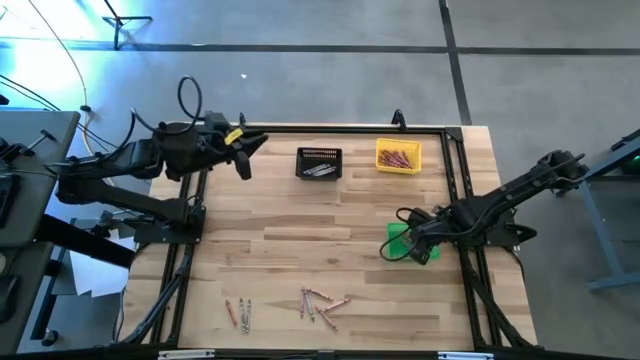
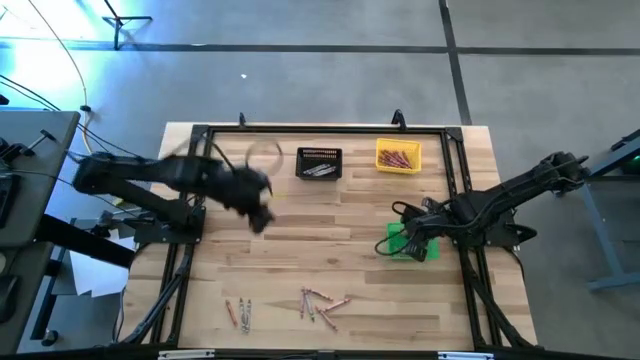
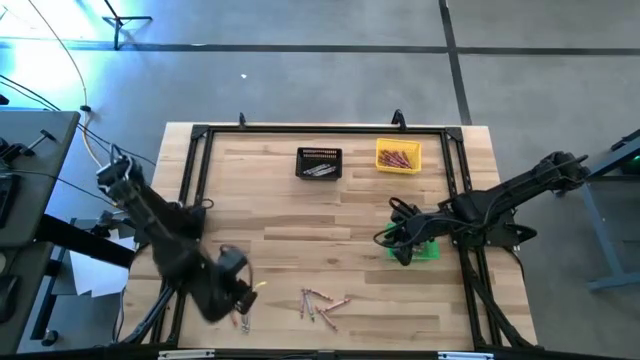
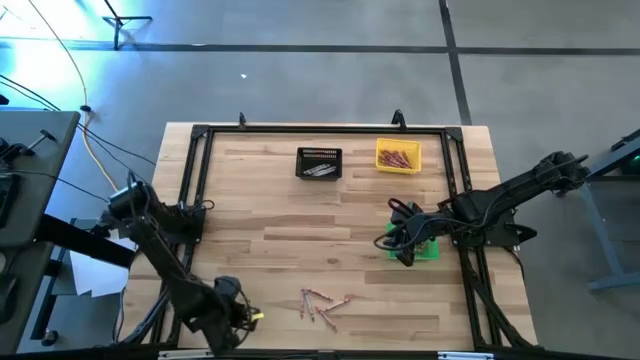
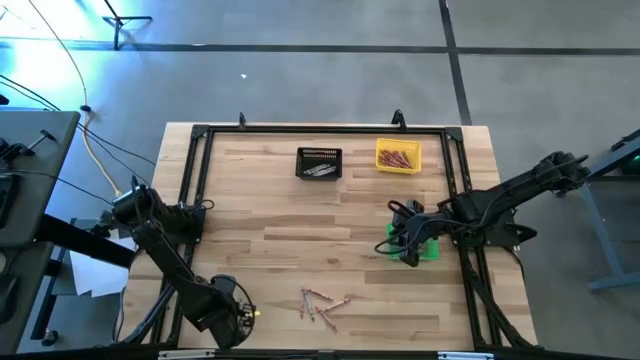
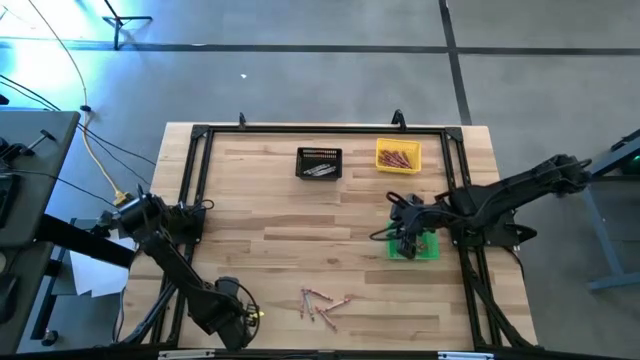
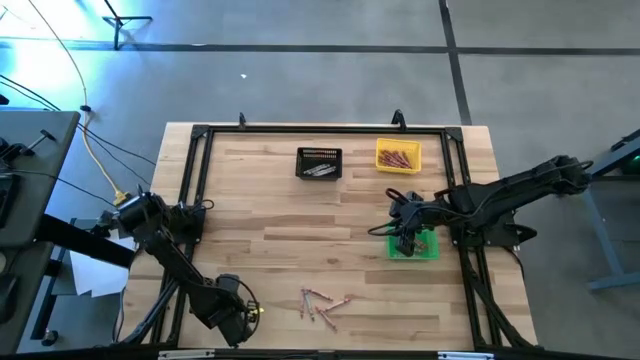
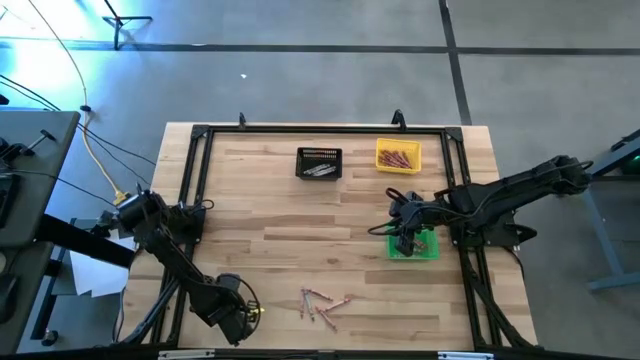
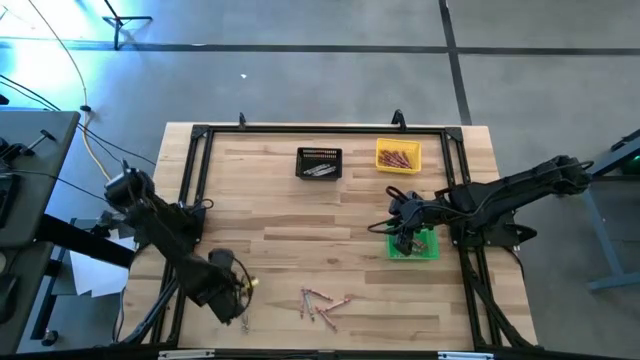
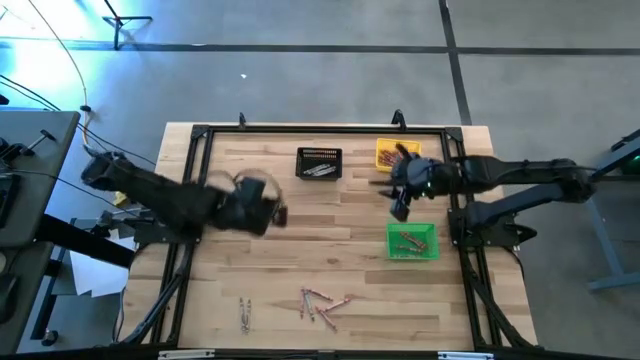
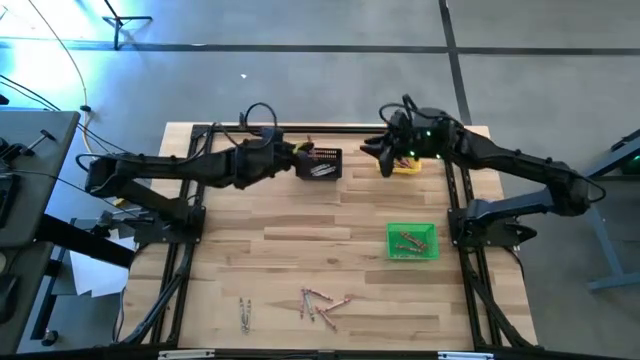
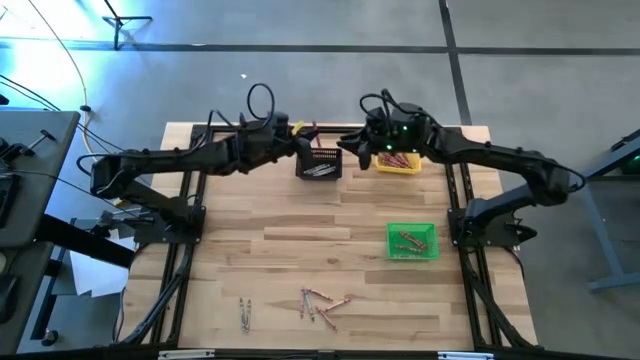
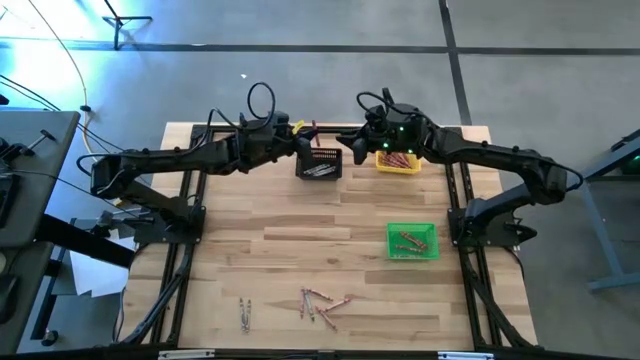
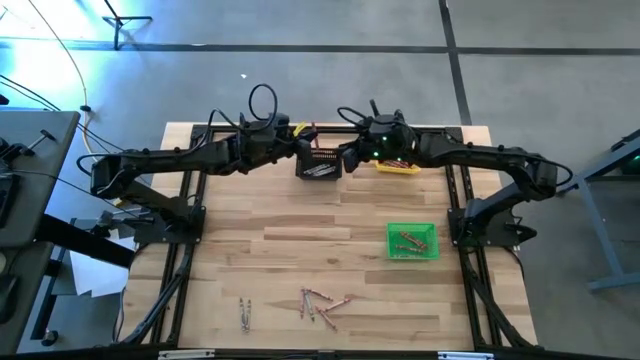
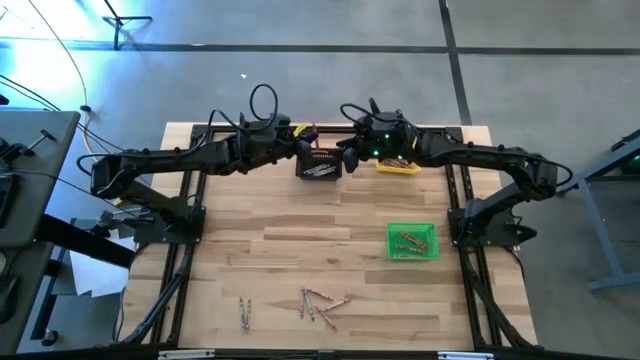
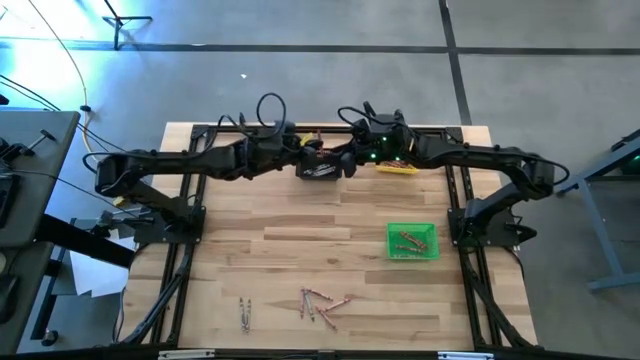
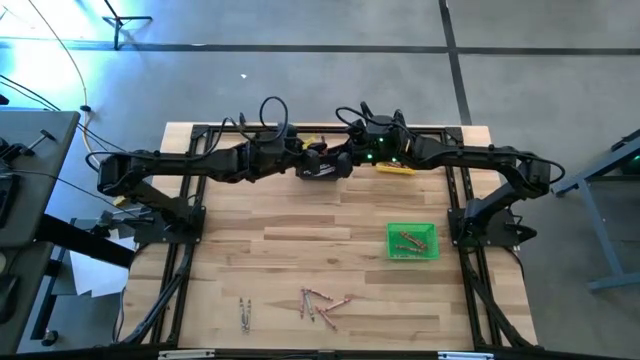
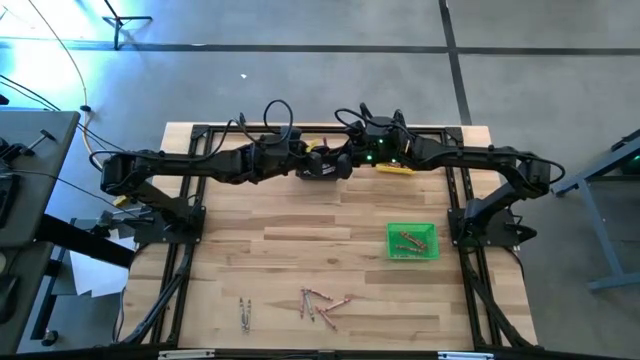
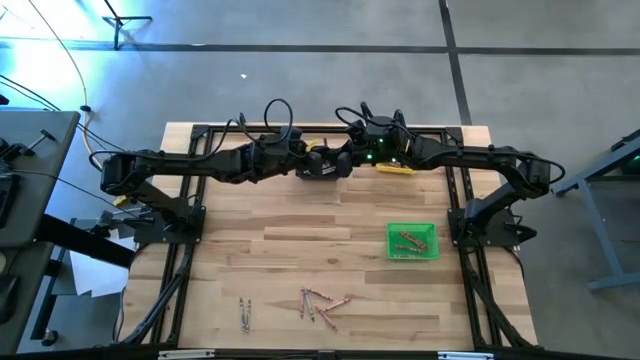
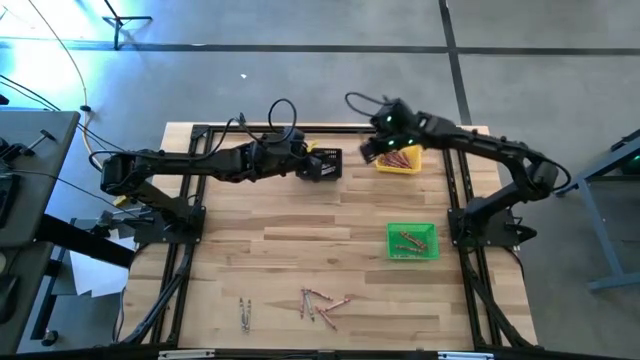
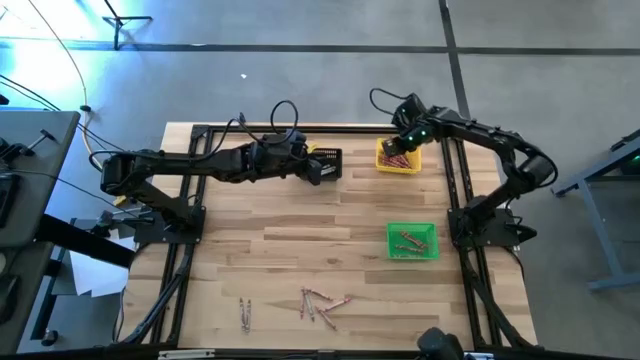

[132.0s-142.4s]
Task: Sort crayons
Put the red crayon into the yellow basket

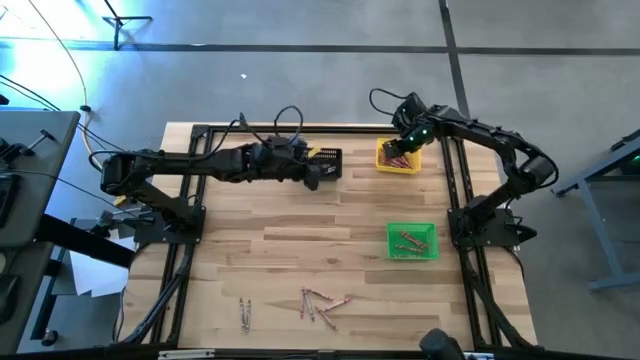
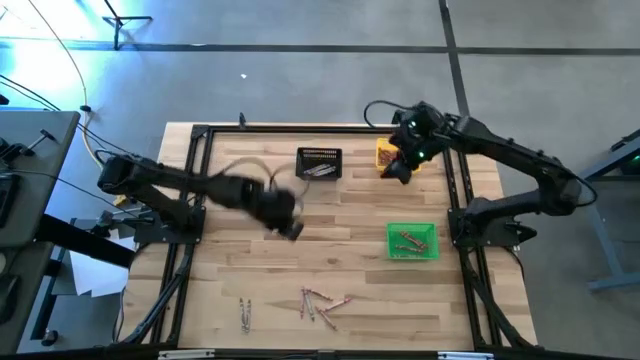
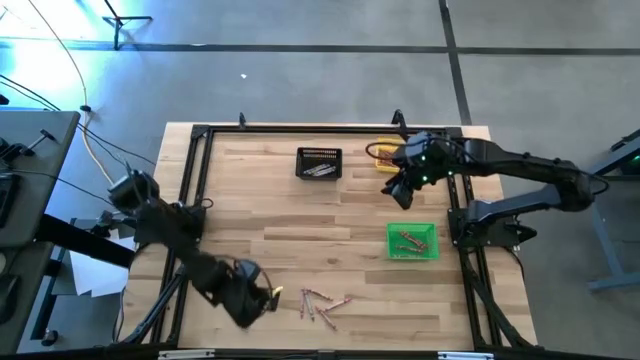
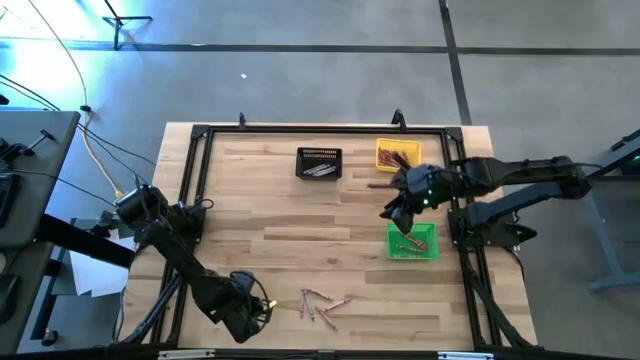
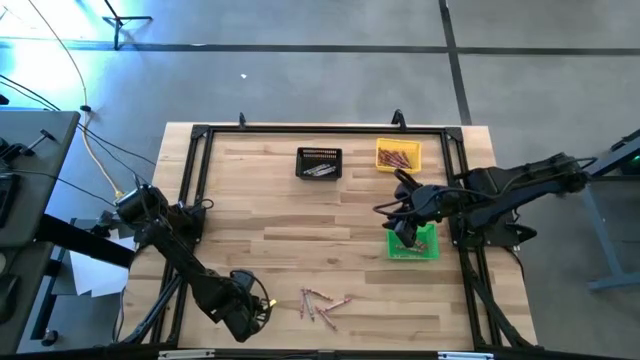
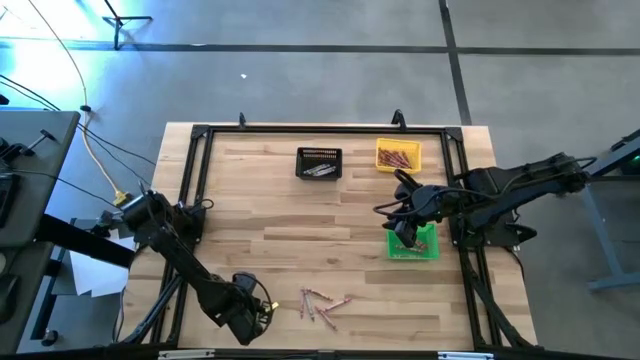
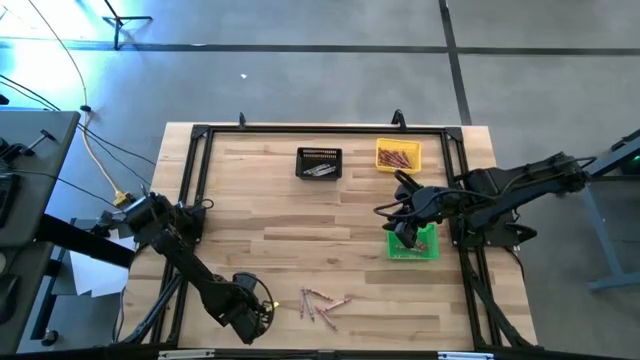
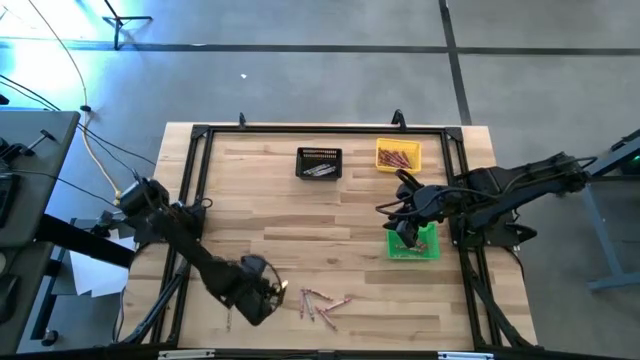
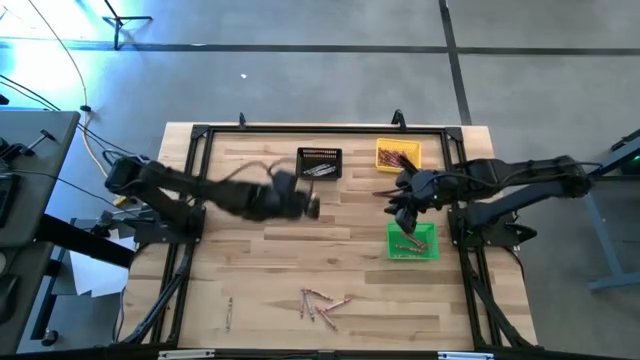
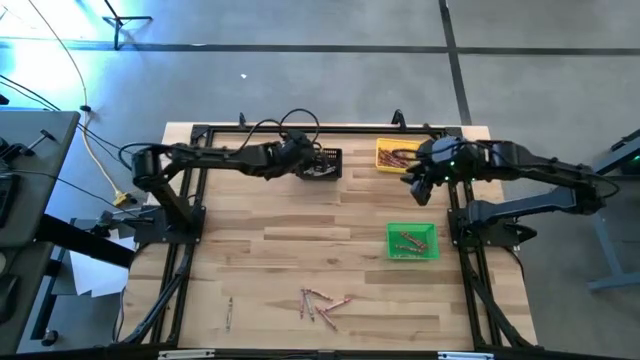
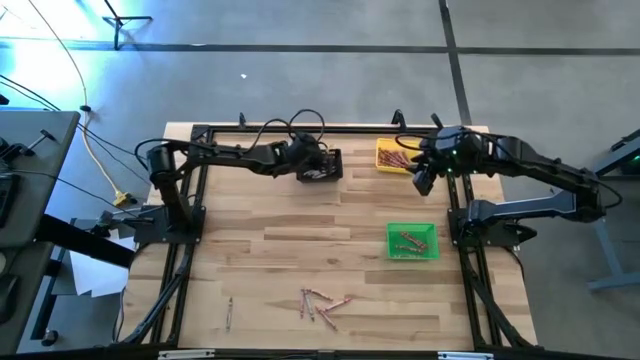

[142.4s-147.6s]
Put the gray crayon into the black basket

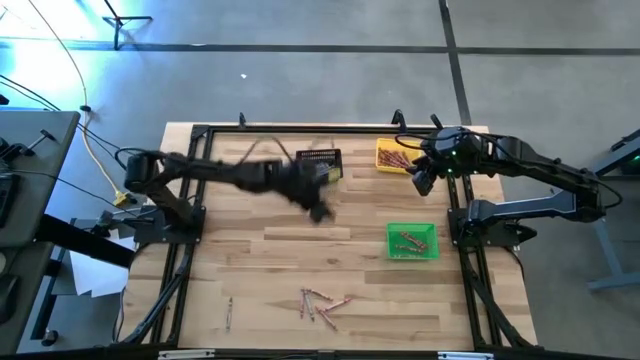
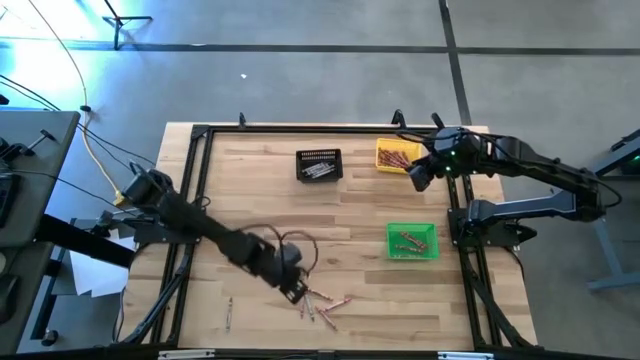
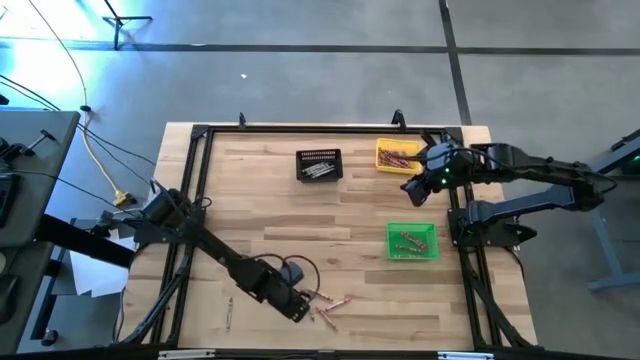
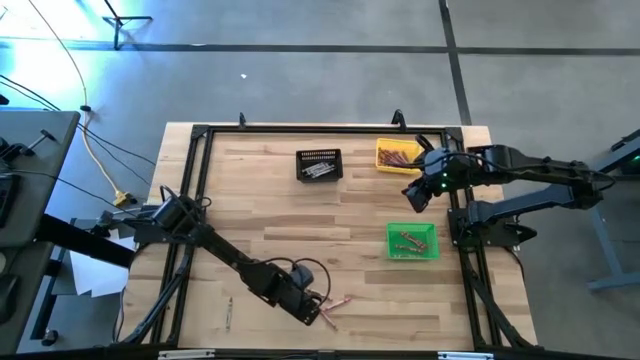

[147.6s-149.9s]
Put the pink crayon into the green basket

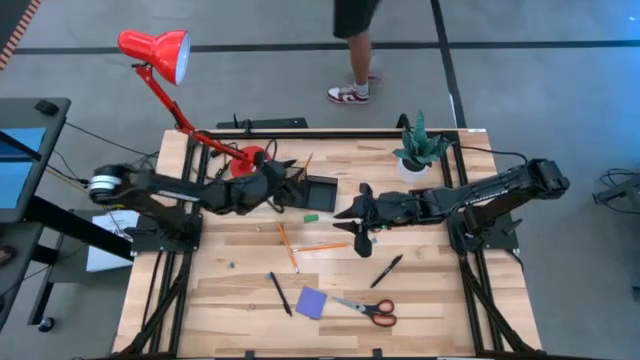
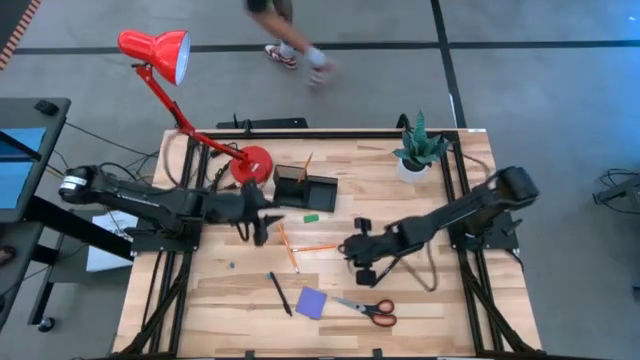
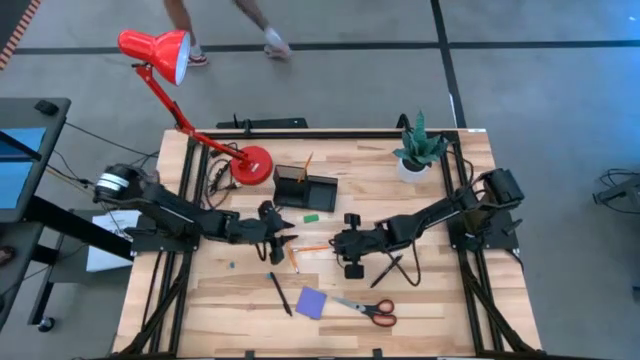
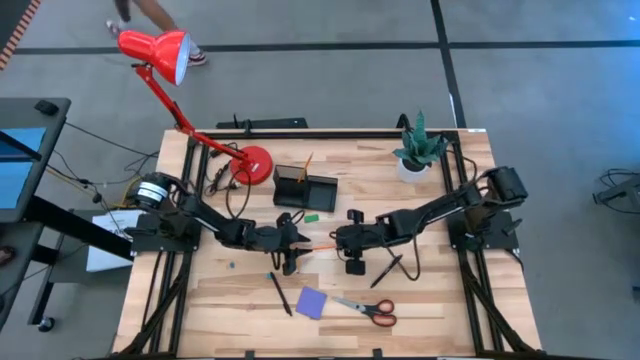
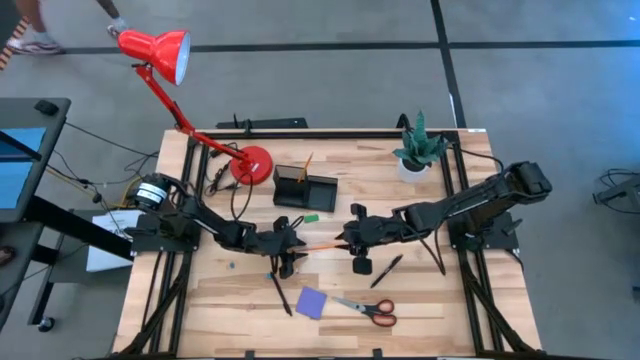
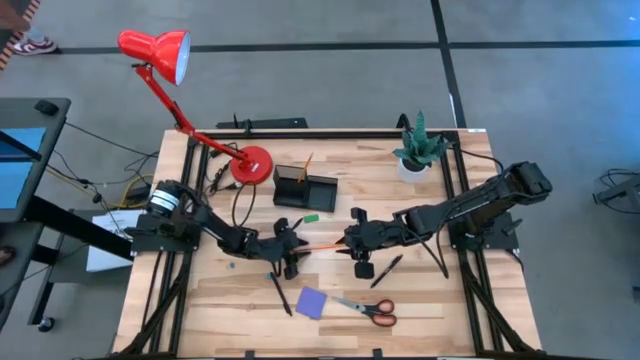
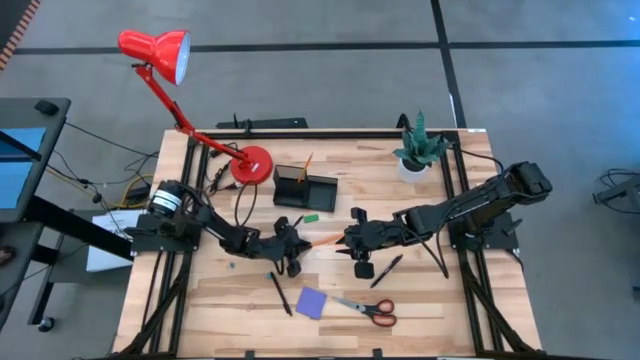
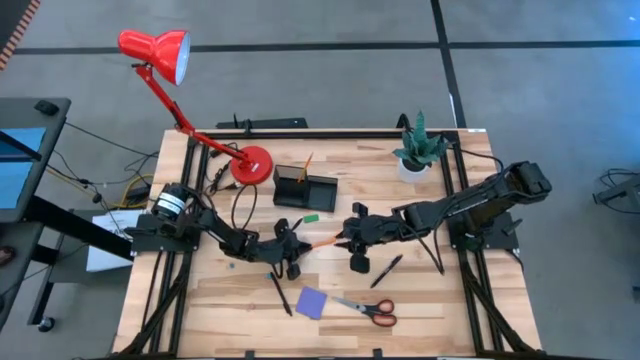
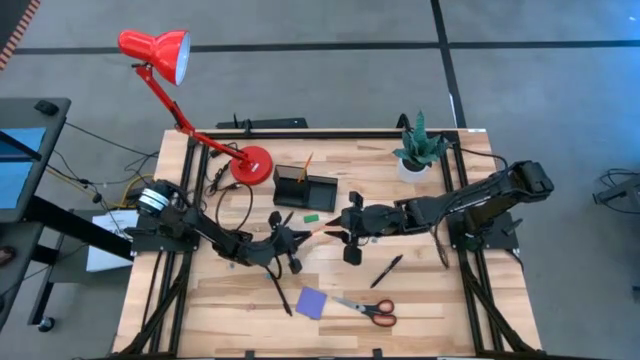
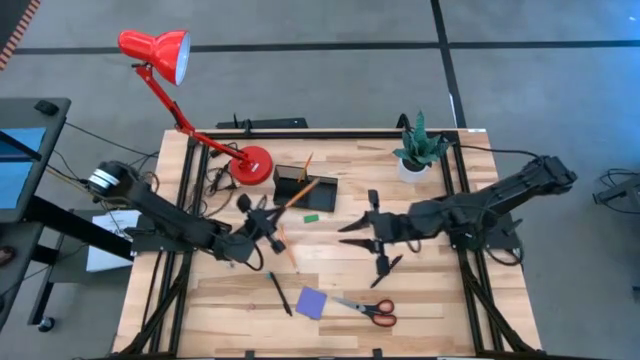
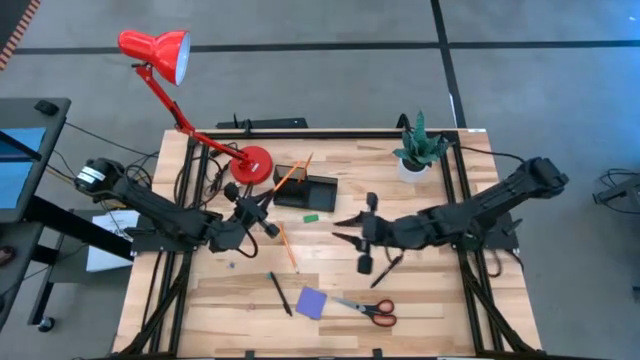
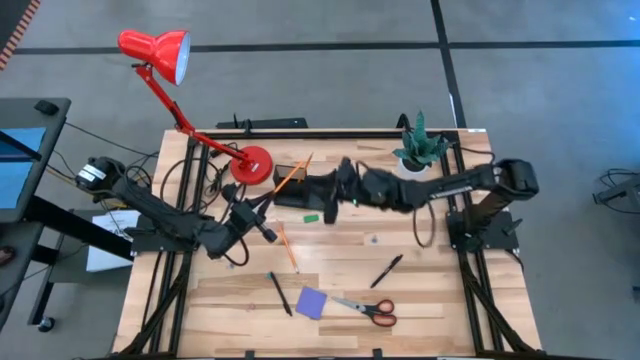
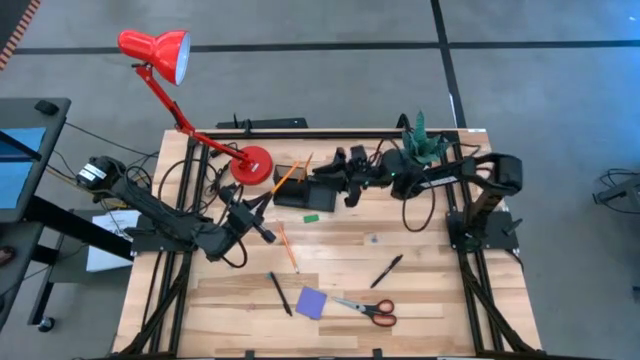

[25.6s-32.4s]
Task: Pick and place office supplies into organizer
Put the right yellow pencil into the black desk organizer
